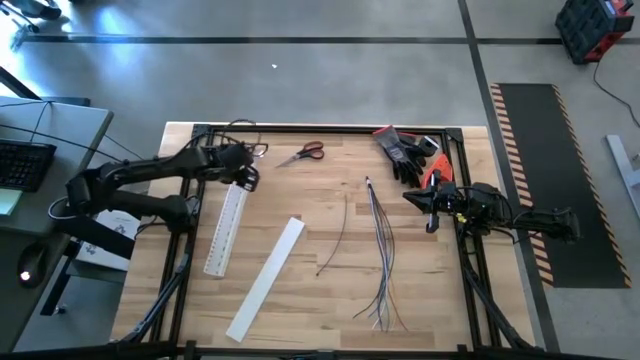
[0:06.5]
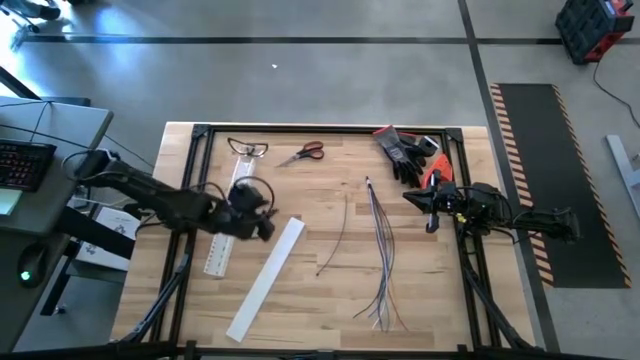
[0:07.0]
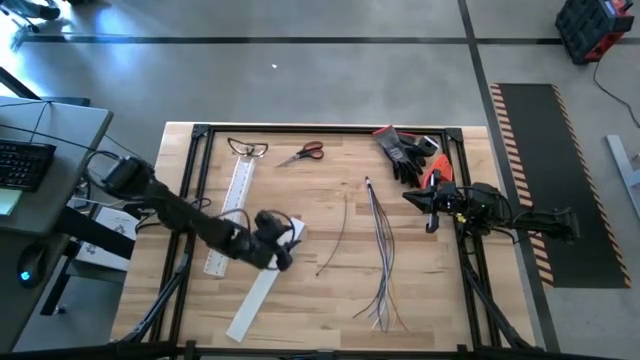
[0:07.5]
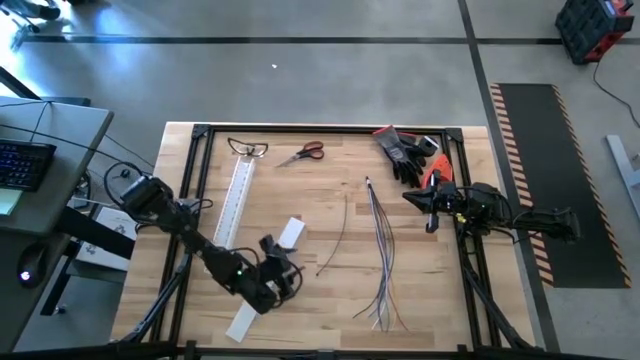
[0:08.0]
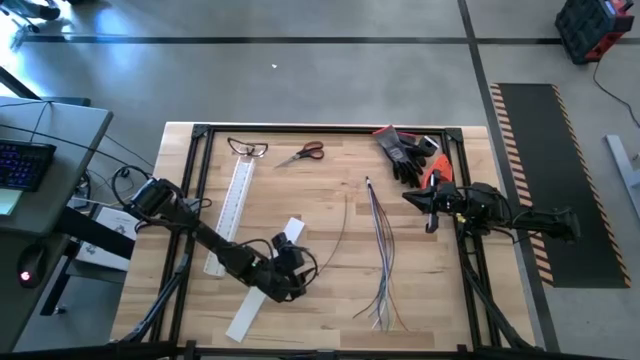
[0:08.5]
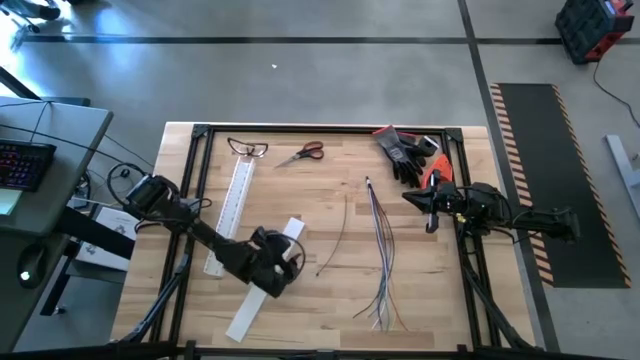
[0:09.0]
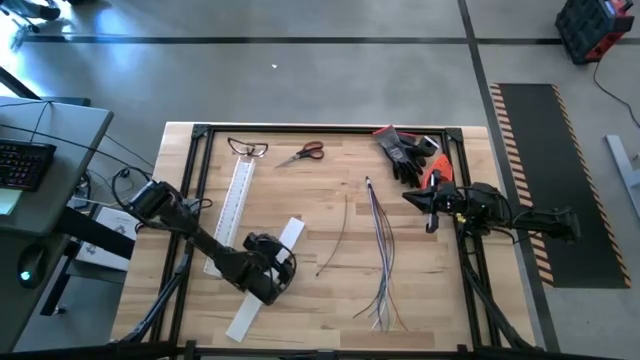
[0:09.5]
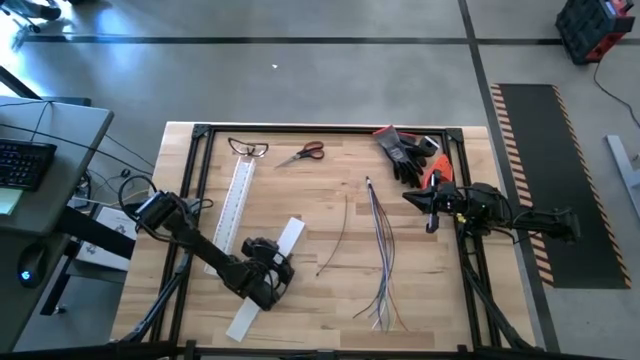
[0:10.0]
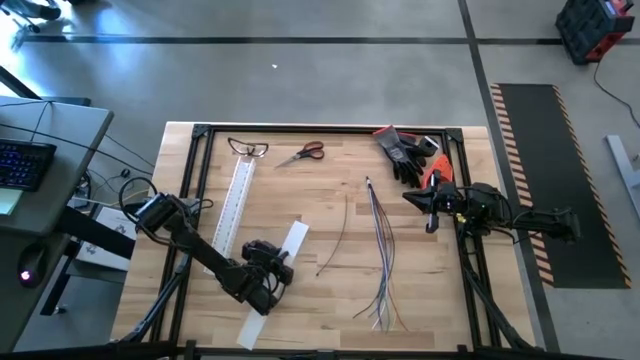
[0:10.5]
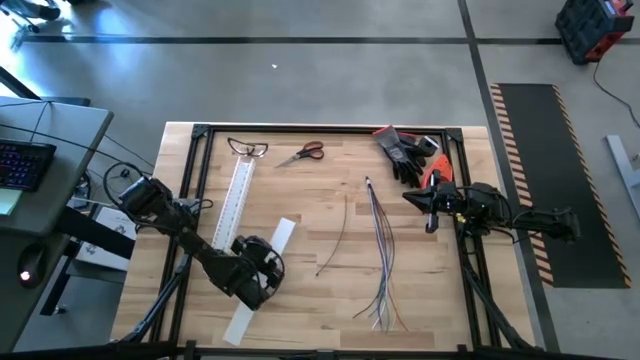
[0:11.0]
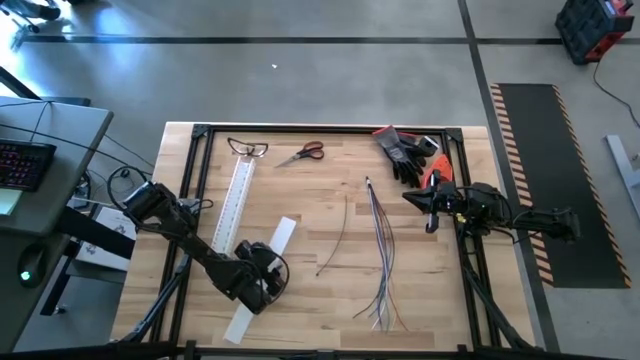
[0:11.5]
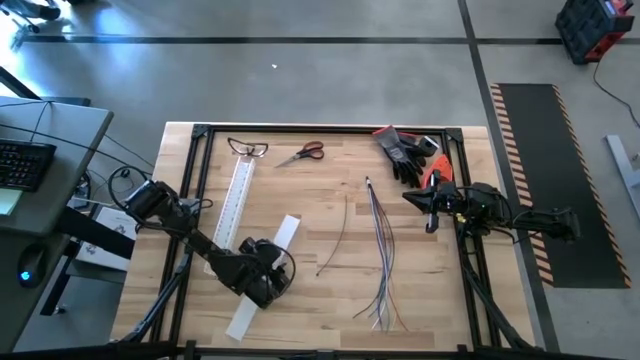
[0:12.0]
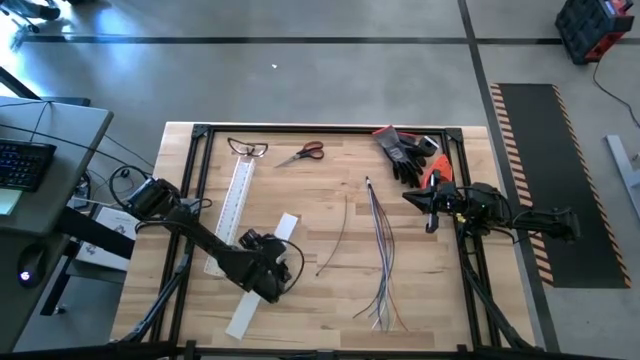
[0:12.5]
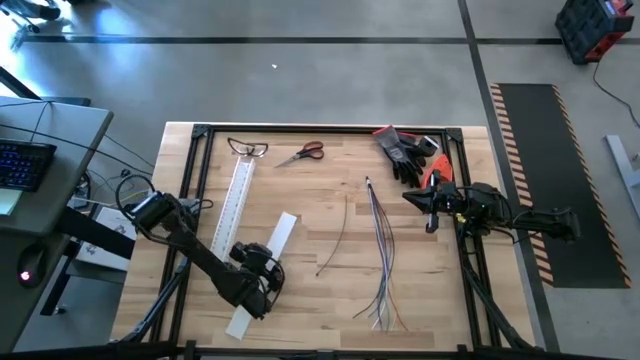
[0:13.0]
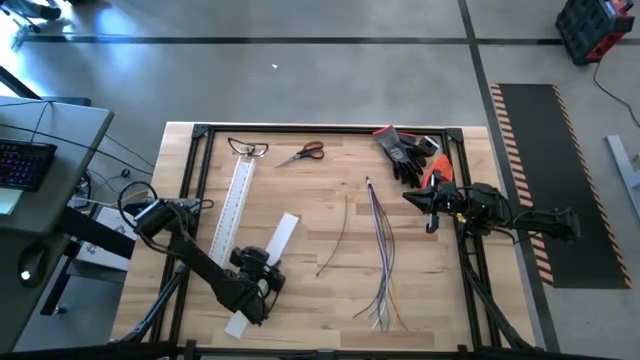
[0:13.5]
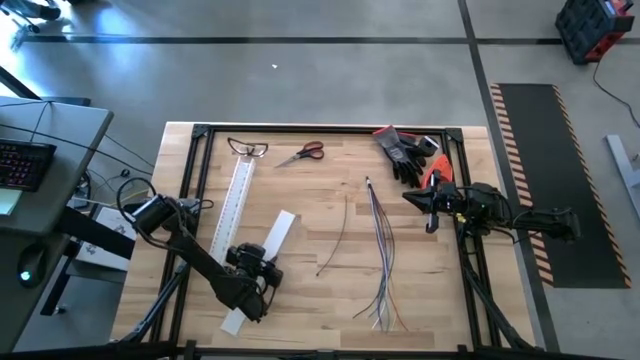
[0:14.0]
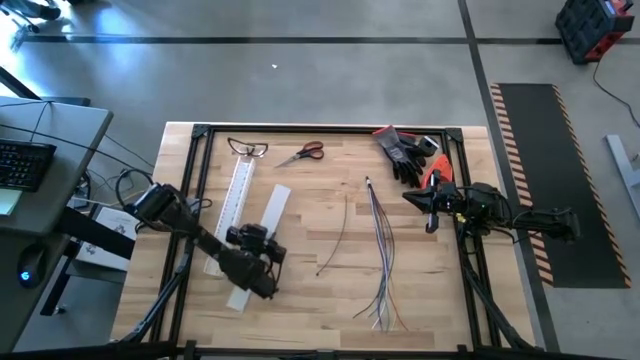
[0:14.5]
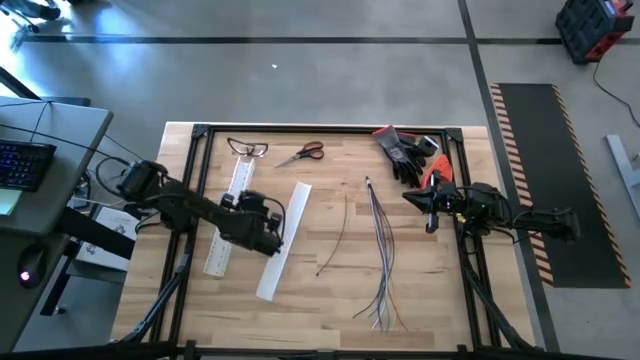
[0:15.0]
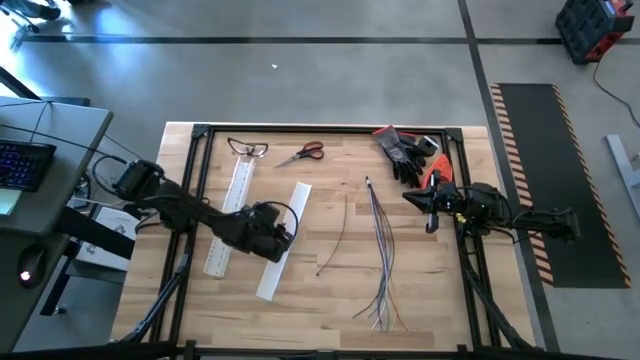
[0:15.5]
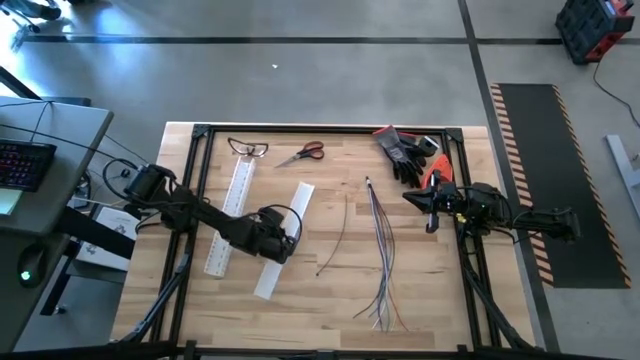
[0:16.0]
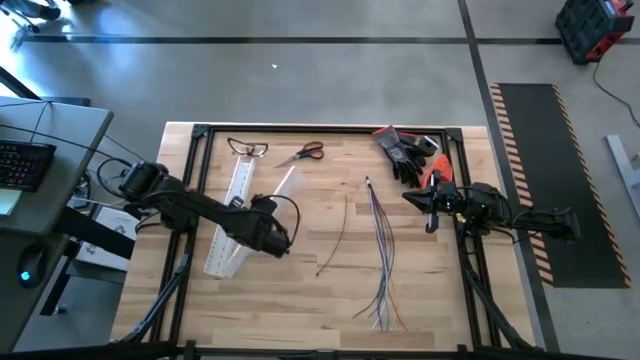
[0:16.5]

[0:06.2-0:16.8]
Task: Ziptie cables
Move the white cable duct lid to the left side of the table

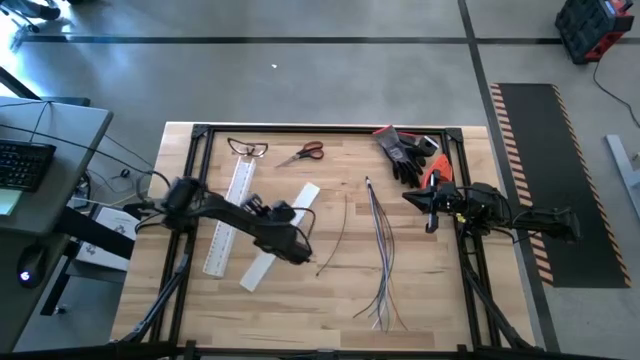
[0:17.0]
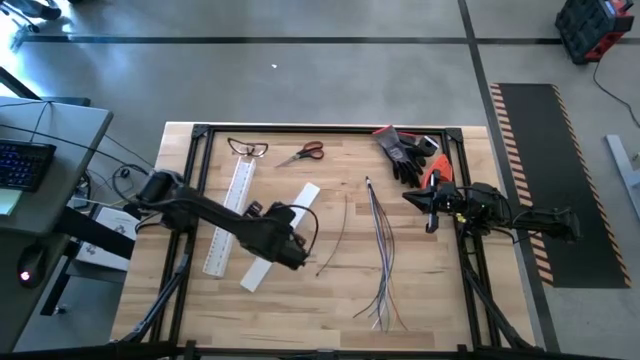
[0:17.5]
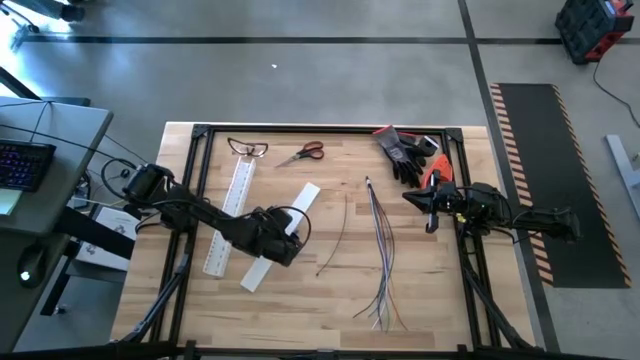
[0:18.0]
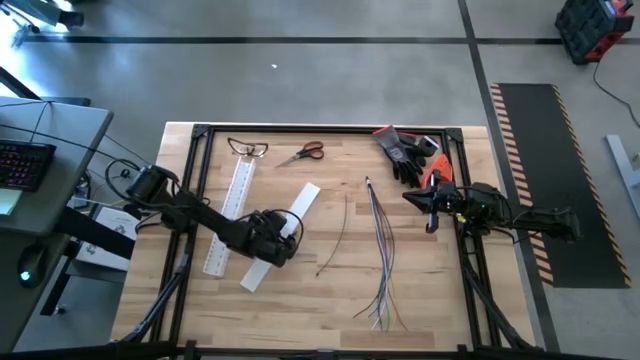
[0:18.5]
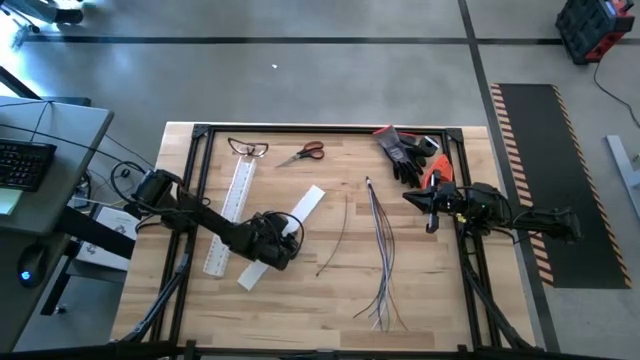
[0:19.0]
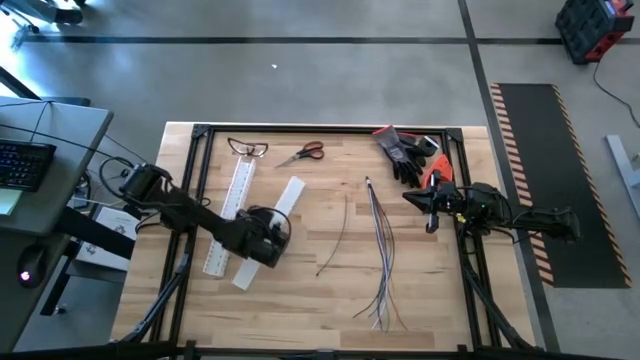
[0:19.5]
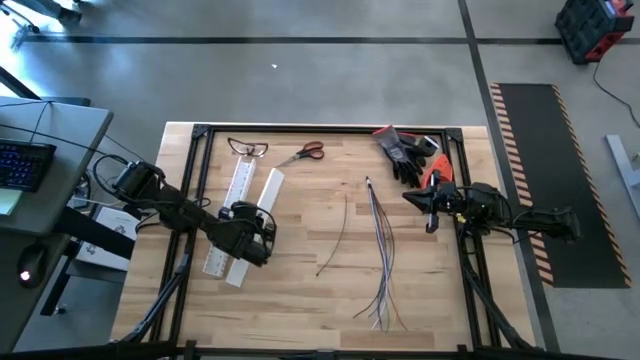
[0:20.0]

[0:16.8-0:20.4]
Move the white cable duct lid to the left side of the table

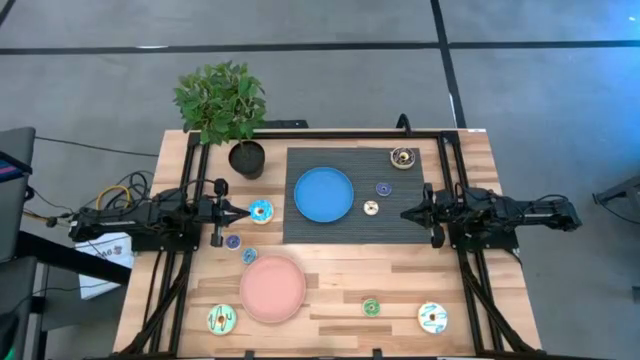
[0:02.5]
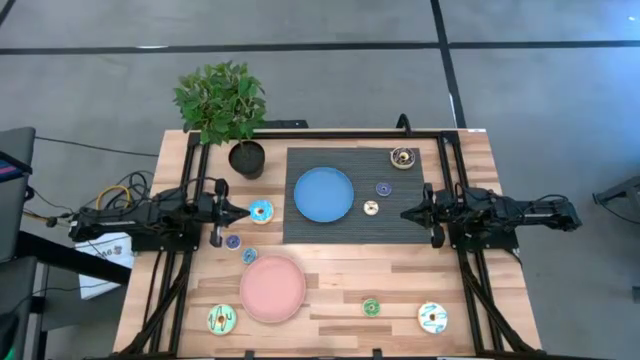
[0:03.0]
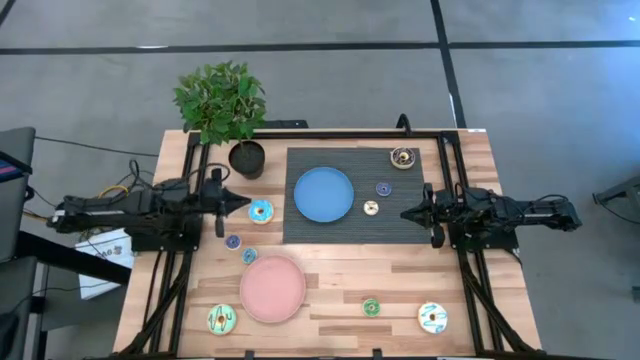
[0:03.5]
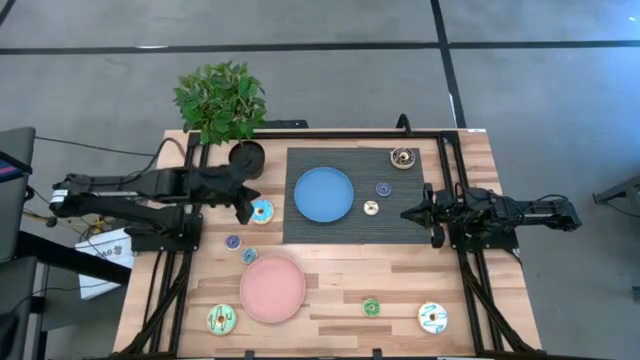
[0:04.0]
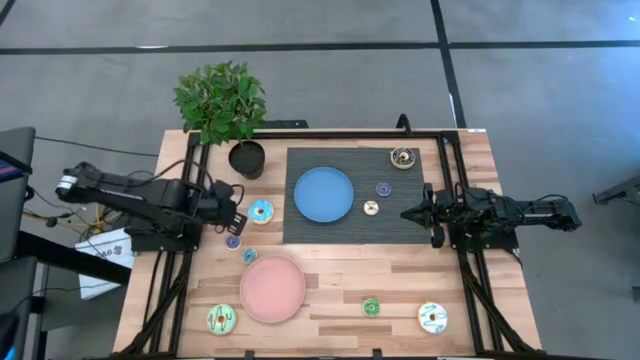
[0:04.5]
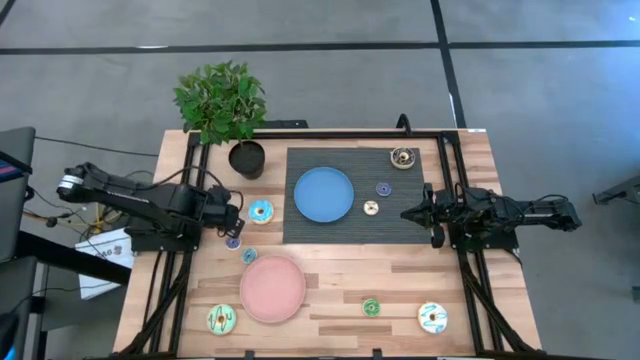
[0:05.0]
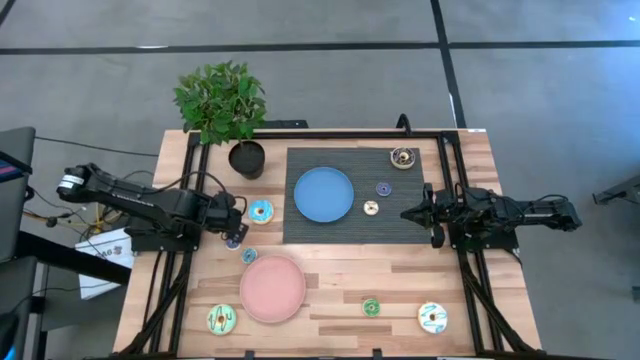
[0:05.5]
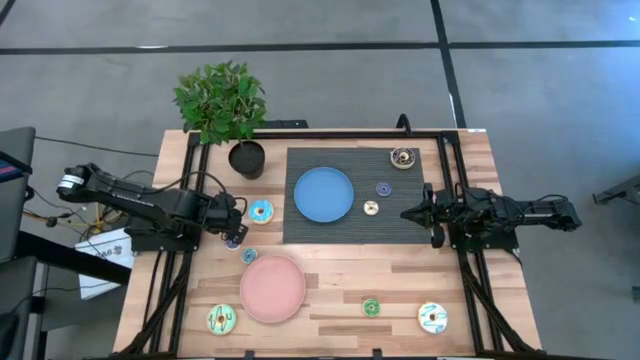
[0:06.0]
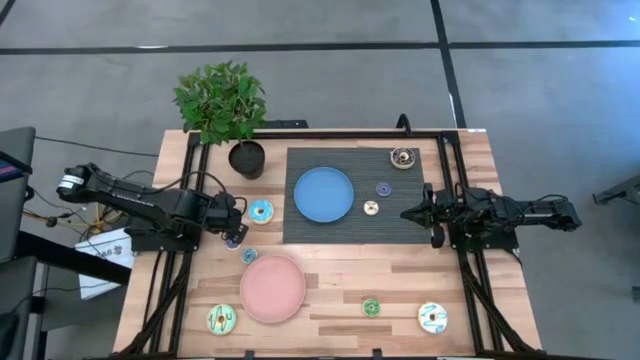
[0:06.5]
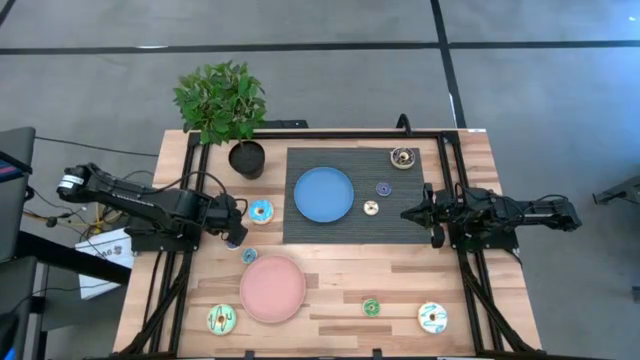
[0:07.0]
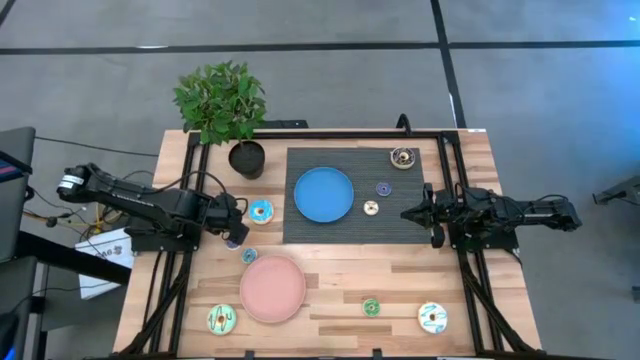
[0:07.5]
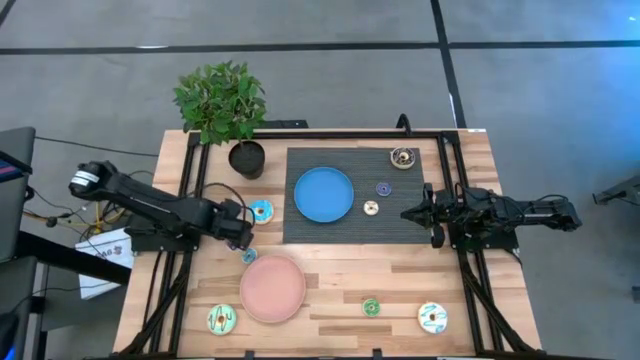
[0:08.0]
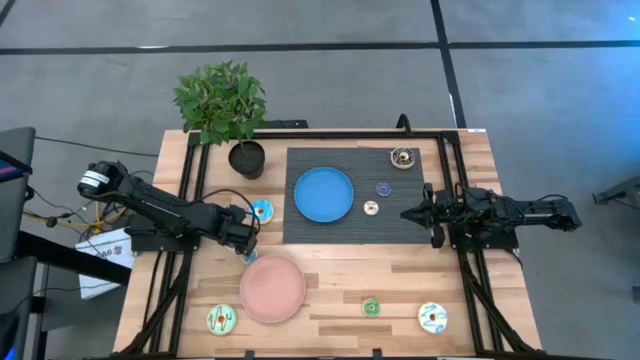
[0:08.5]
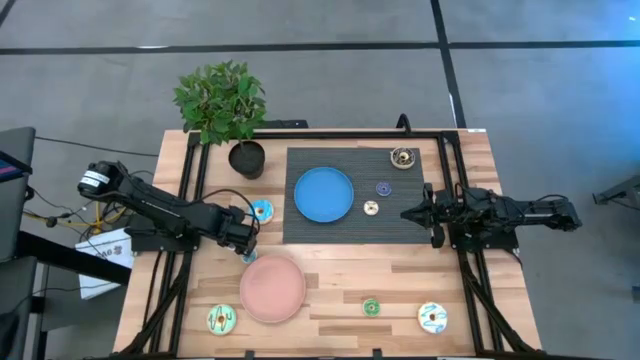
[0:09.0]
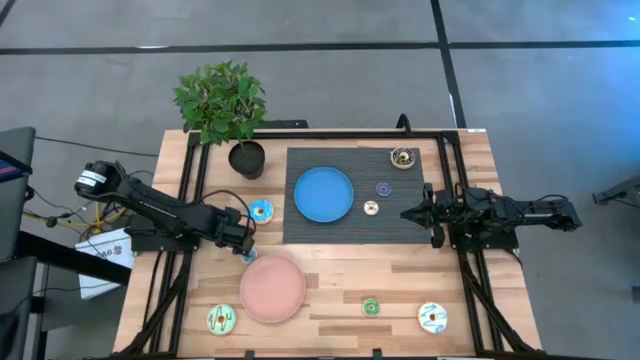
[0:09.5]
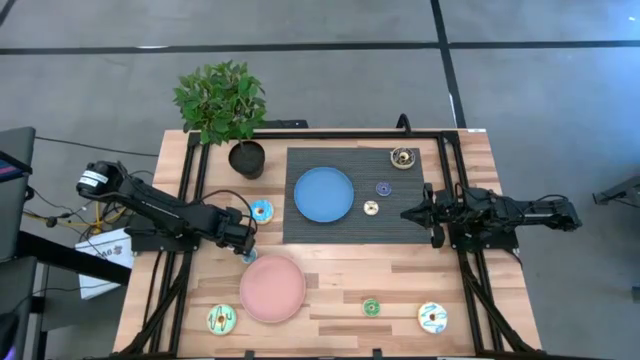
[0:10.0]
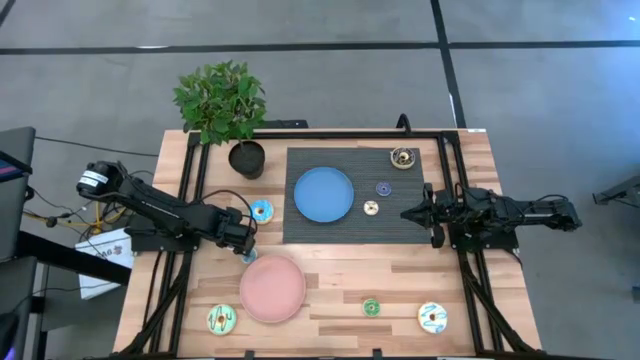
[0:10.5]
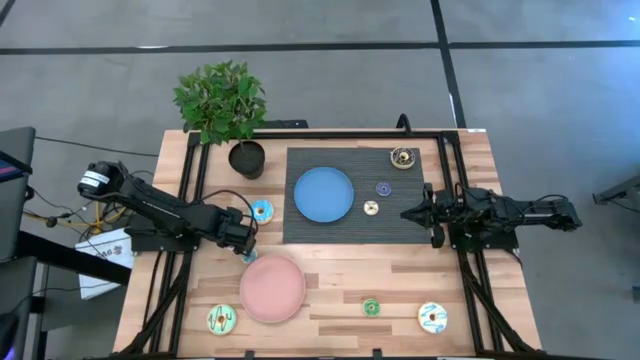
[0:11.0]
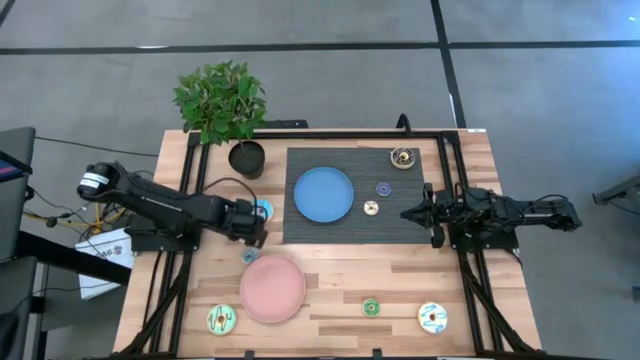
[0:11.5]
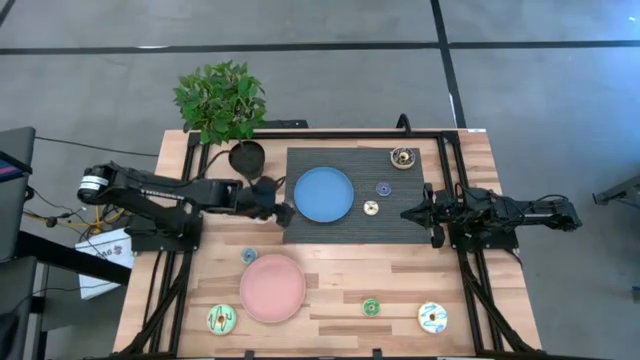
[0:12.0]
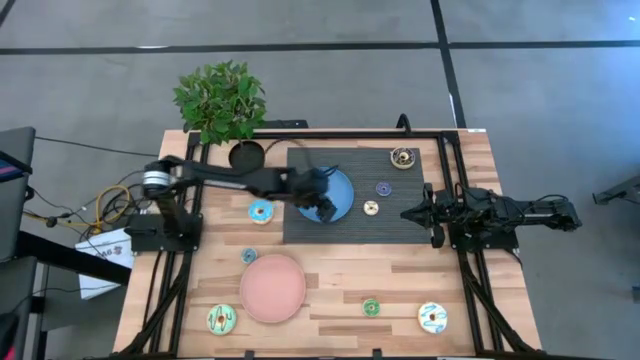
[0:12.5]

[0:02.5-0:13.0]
Task: Pick & Place donuts
Put the small violet donut on the blue plate
